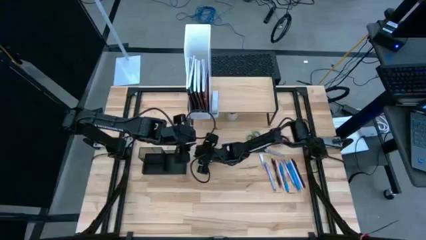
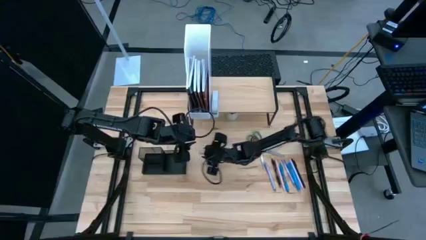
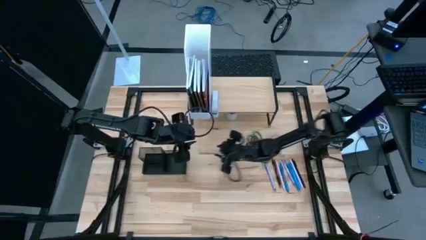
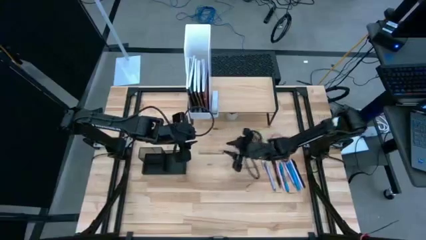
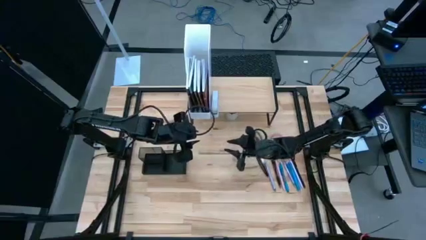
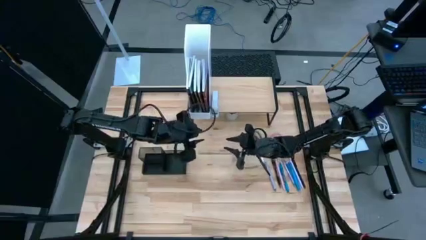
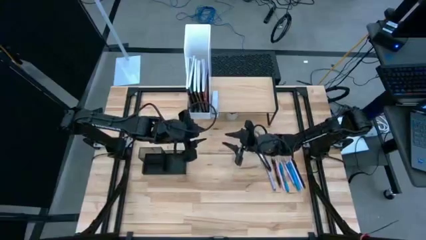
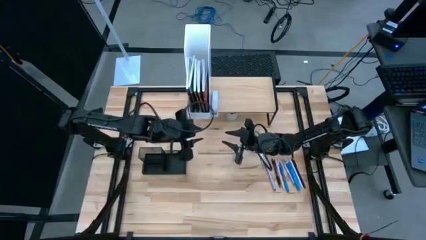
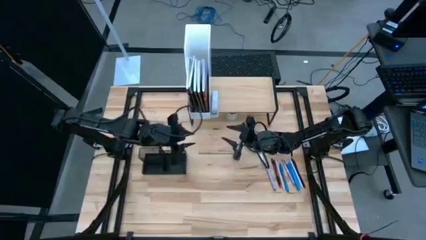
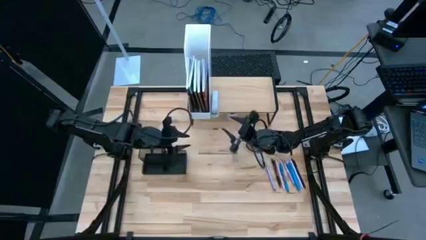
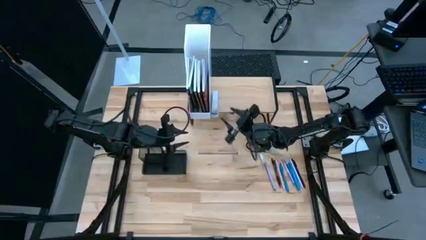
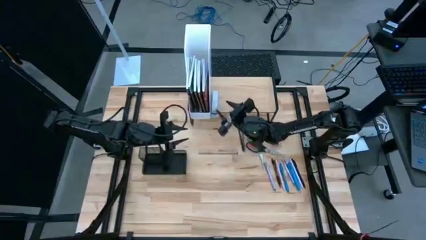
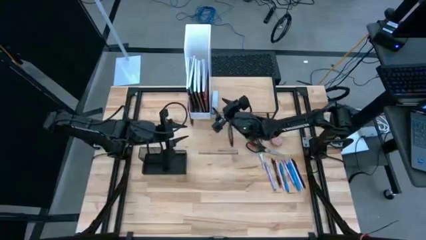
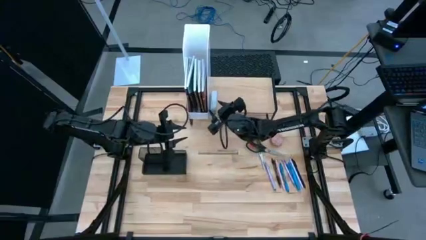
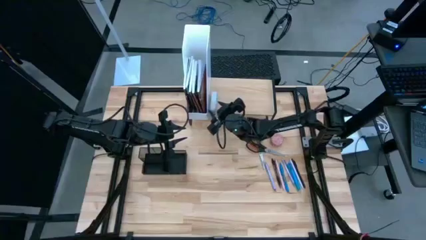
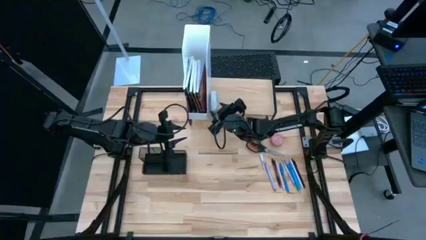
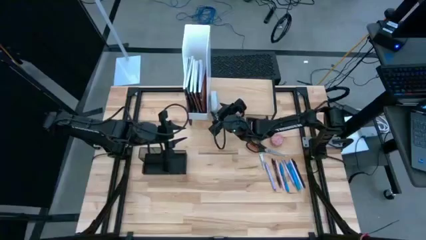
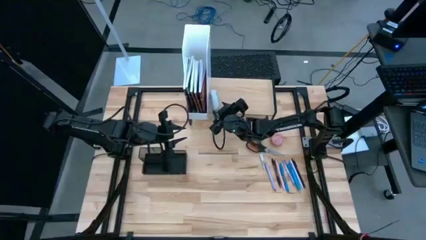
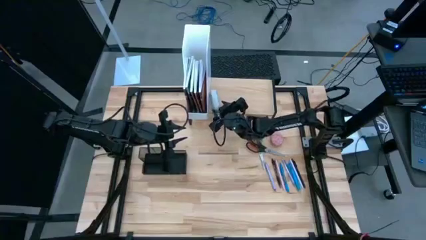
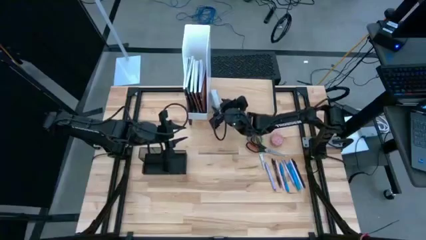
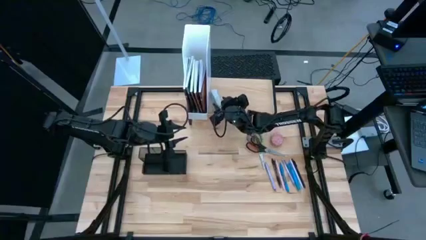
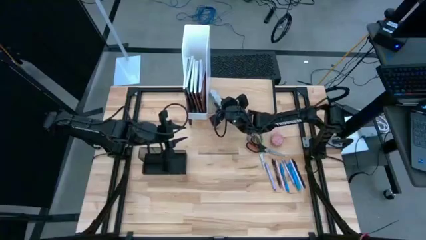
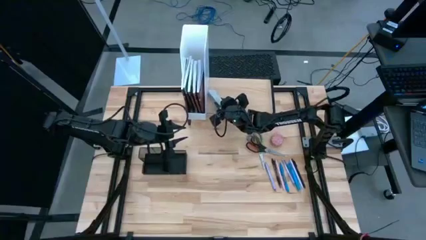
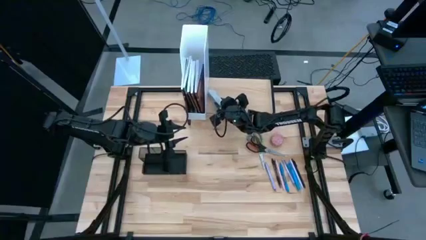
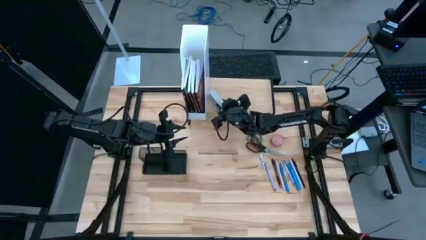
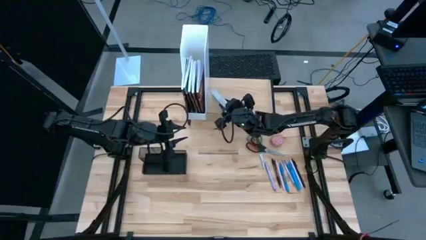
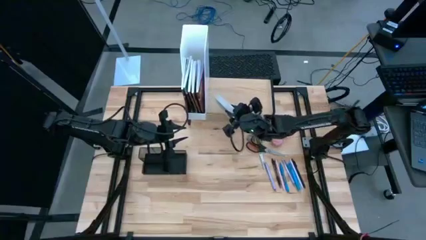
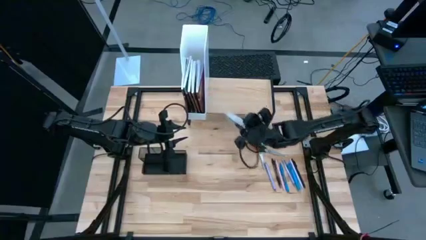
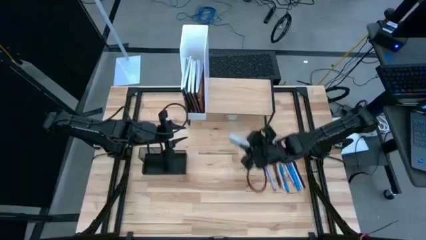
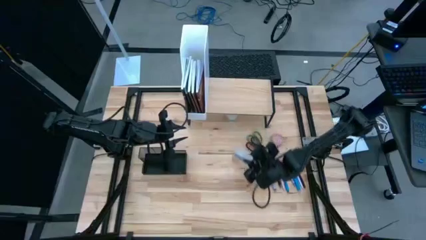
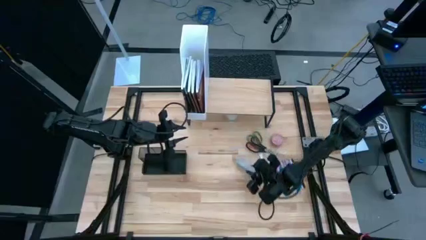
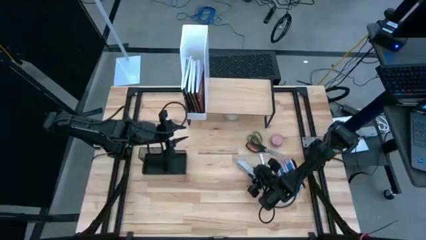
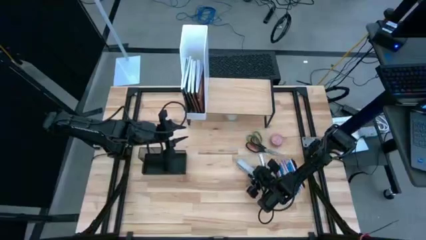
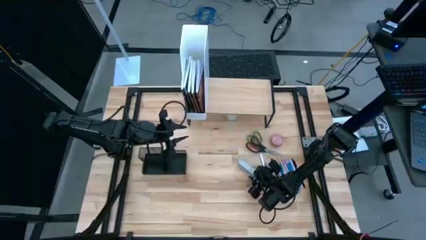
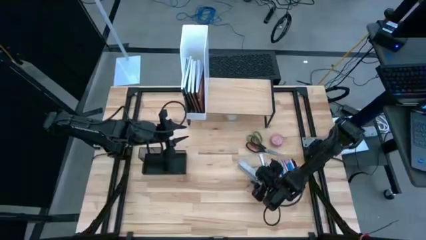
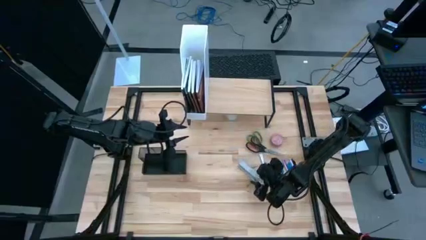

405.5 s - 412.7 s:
Task: Stock shelves
Remove the white stapler from the shelf

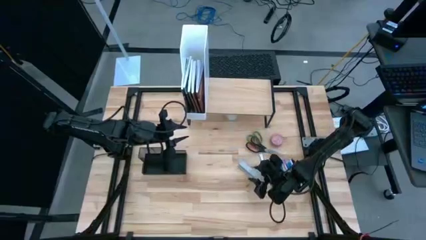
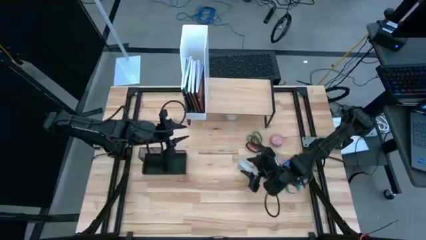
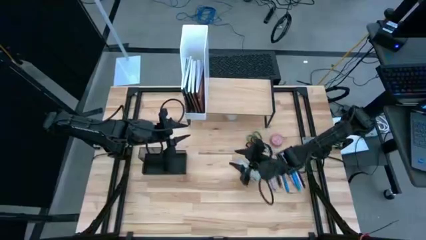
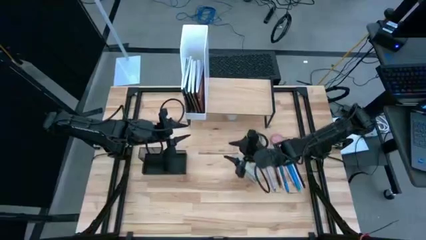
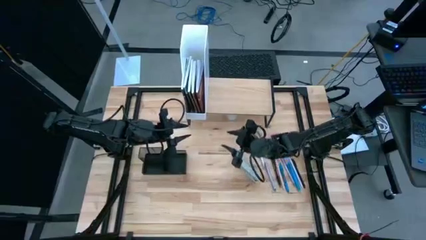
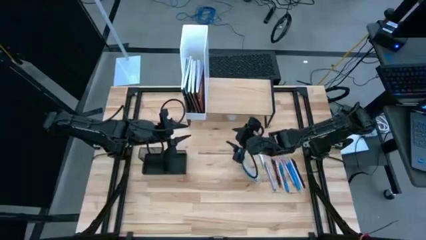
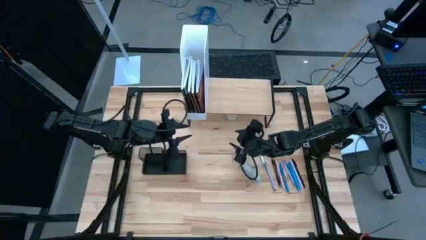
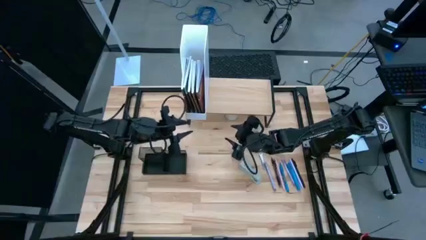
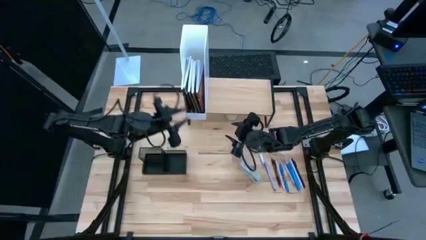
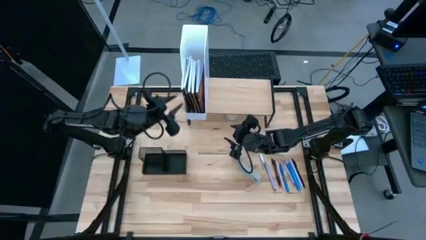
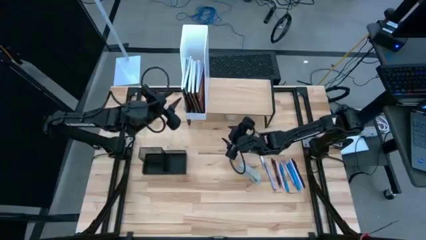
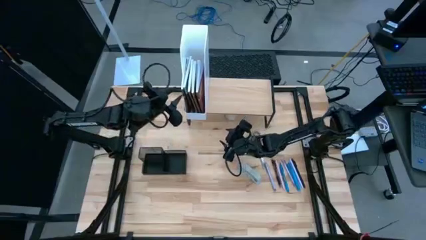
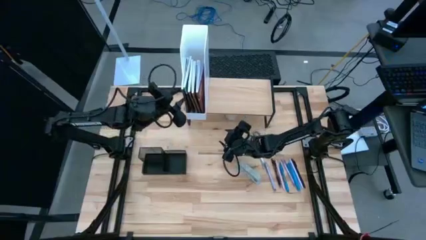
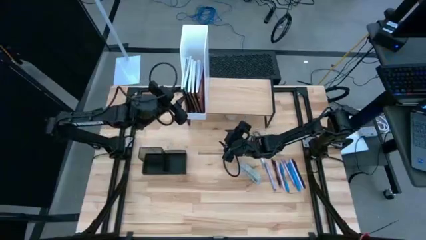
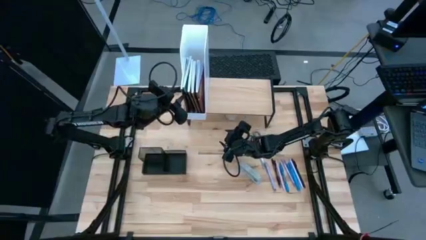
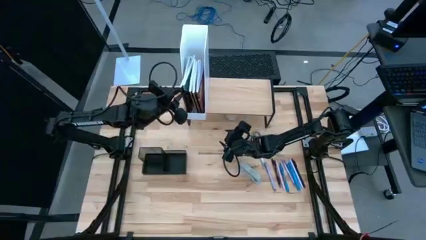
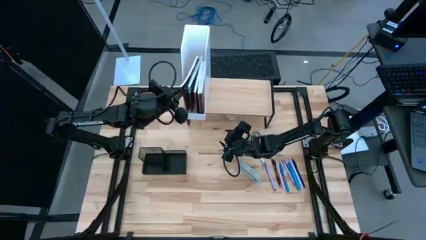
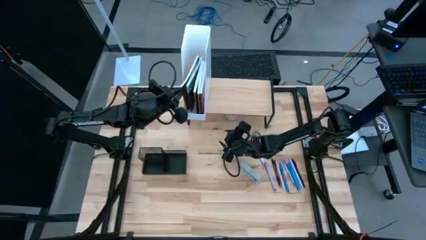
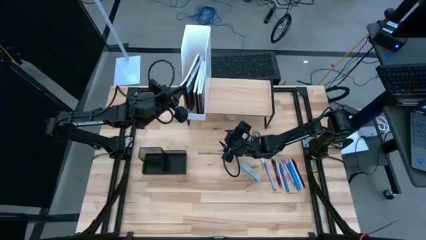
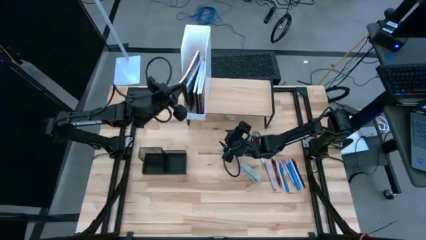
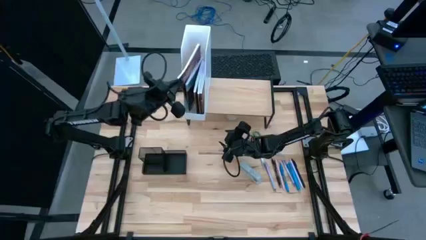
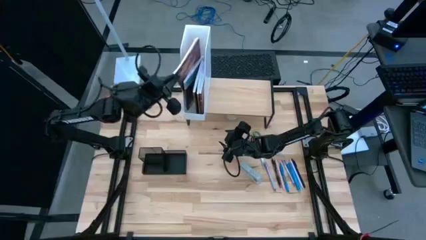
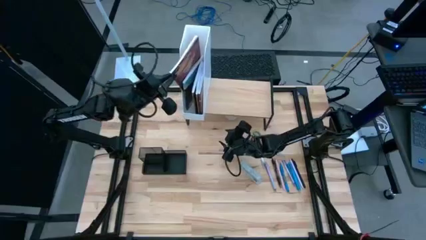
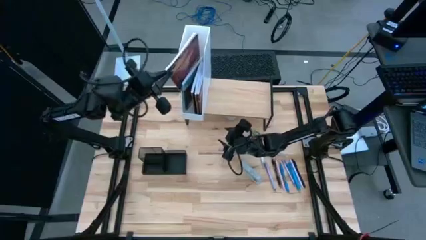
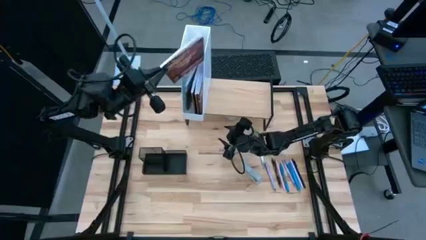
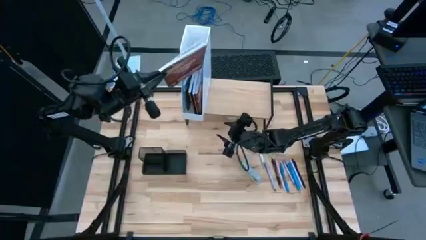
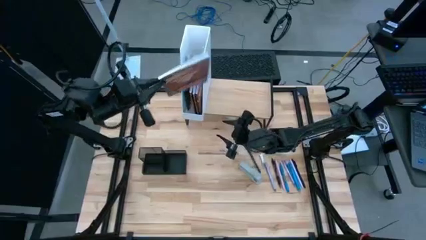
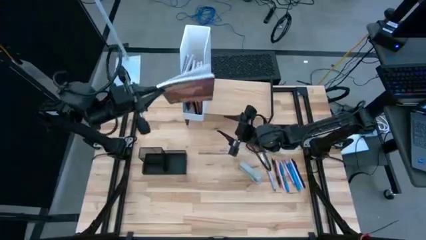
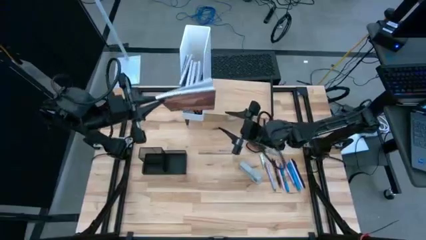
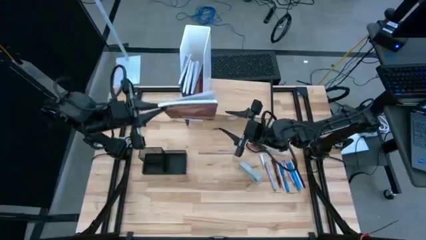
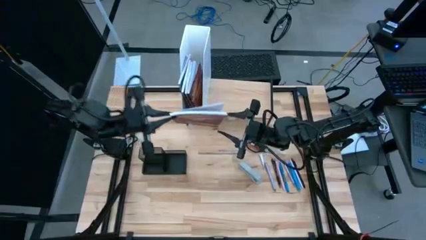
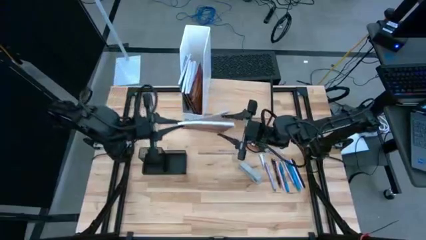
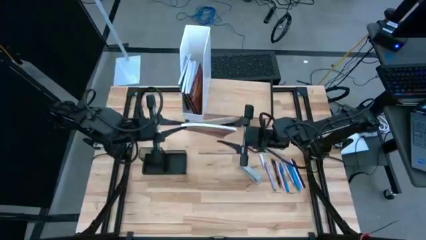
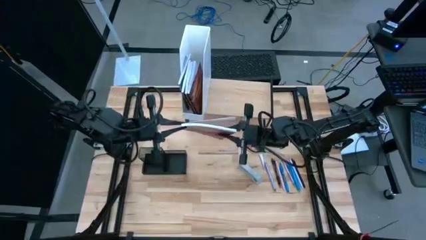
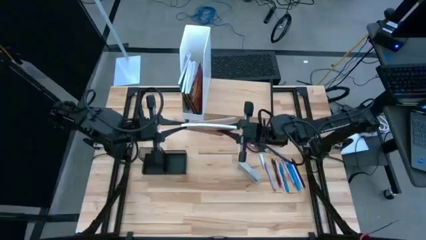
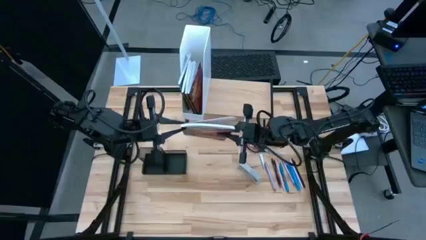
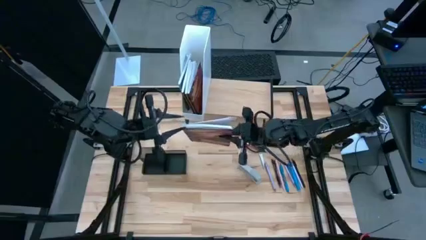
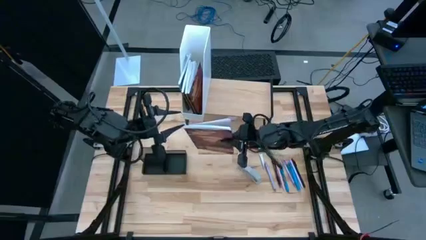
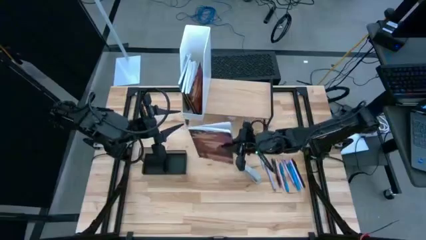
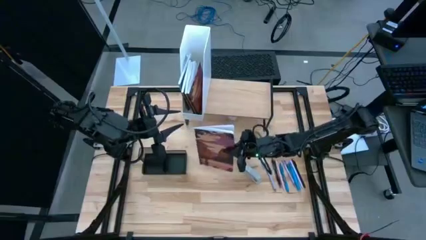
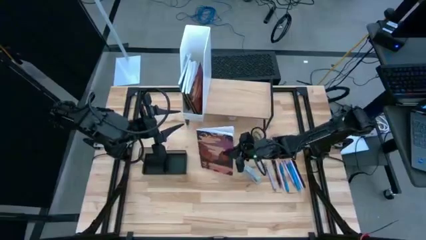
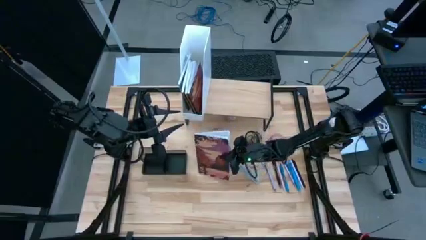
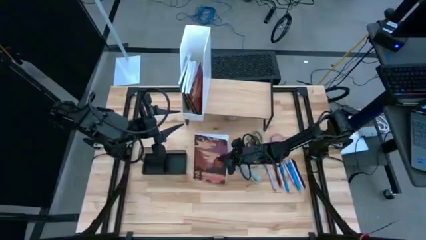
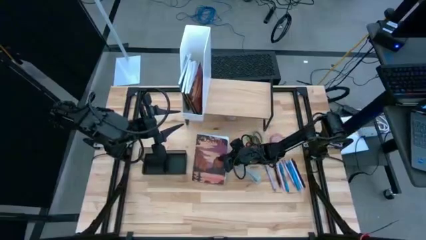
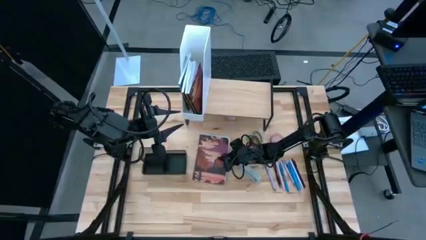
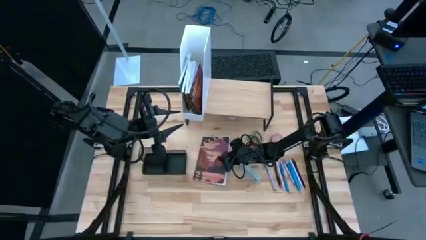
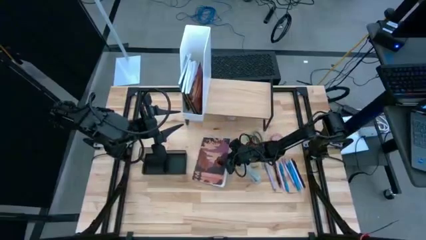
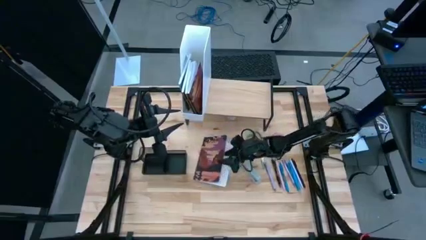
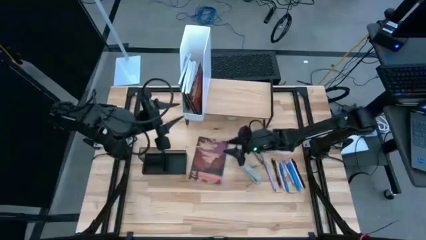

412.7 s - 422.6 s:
Remove the purple book from the white bookshelf on the shelf
